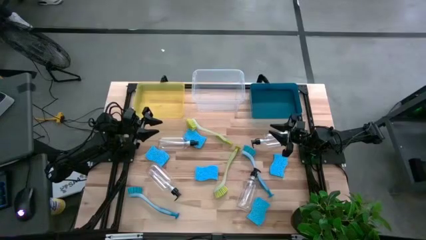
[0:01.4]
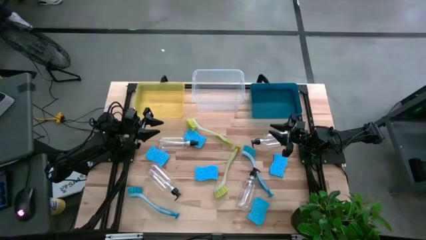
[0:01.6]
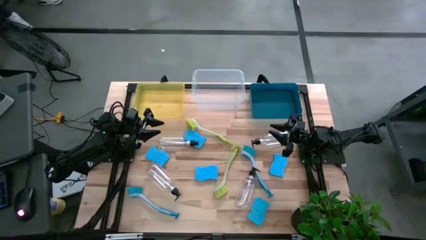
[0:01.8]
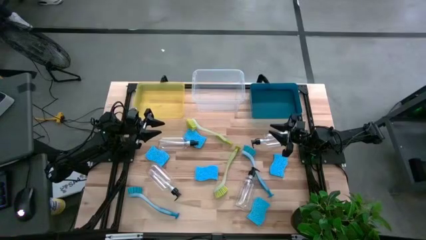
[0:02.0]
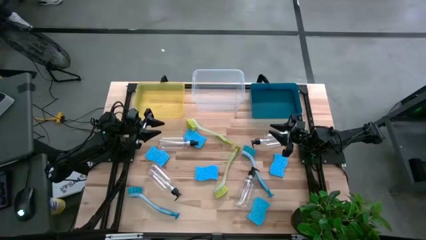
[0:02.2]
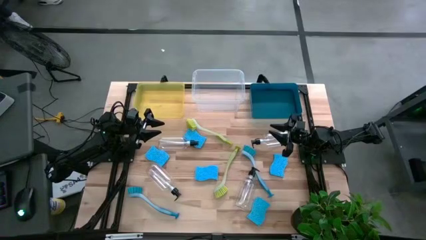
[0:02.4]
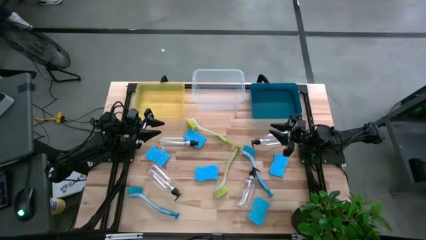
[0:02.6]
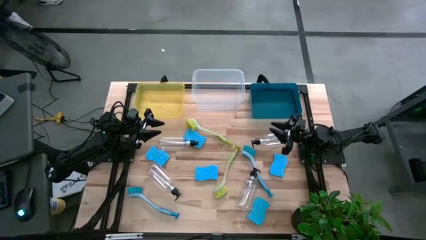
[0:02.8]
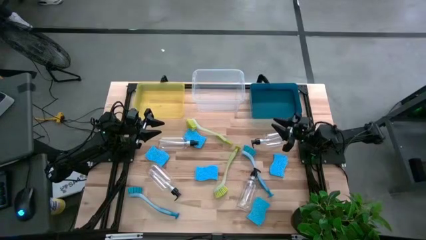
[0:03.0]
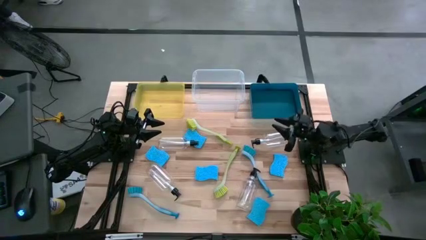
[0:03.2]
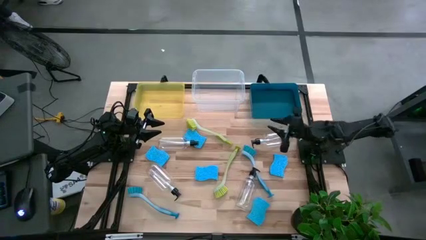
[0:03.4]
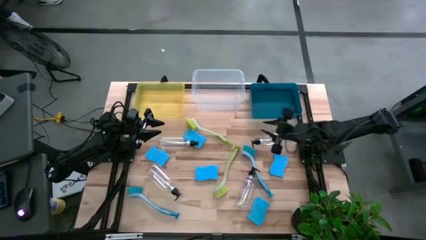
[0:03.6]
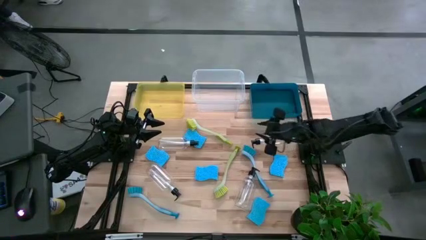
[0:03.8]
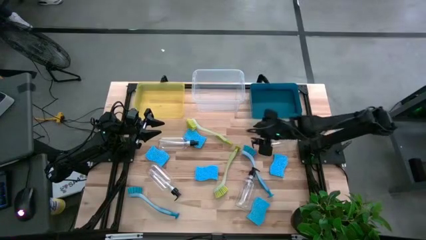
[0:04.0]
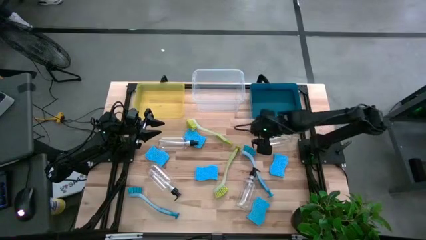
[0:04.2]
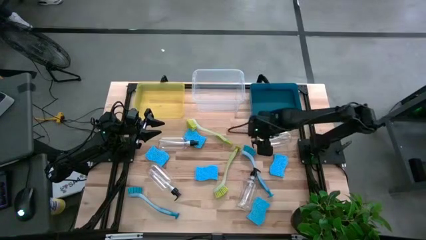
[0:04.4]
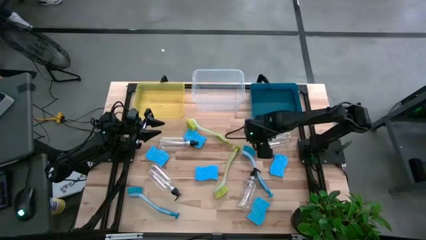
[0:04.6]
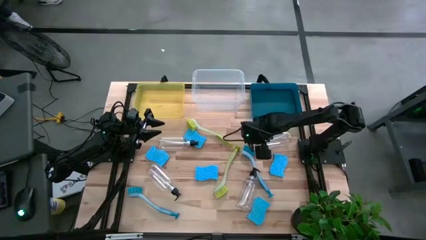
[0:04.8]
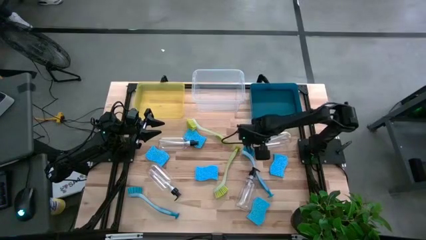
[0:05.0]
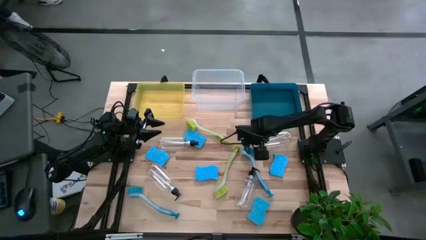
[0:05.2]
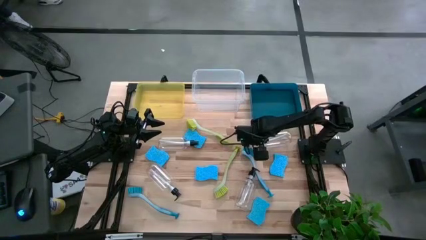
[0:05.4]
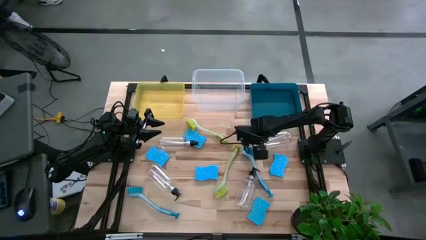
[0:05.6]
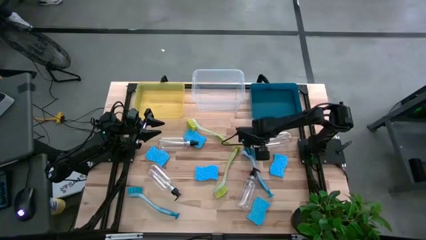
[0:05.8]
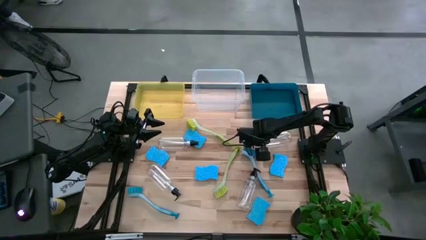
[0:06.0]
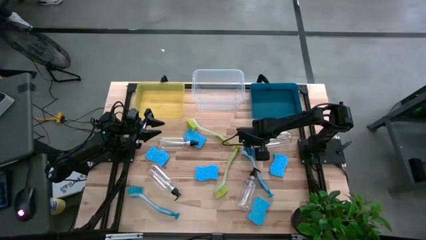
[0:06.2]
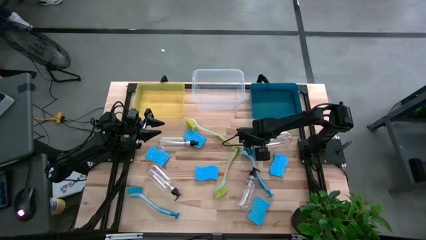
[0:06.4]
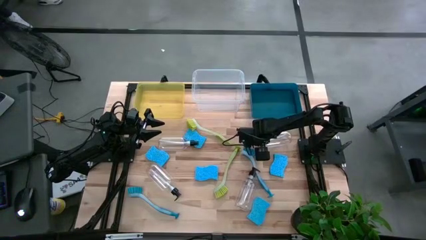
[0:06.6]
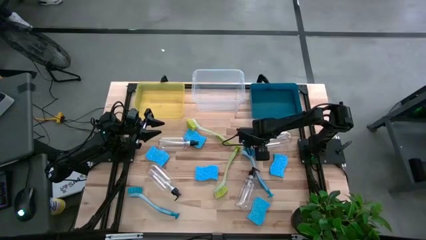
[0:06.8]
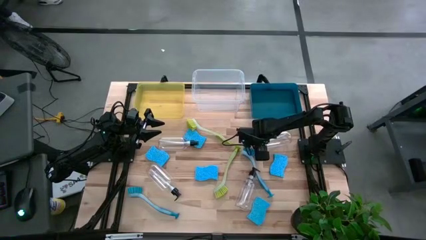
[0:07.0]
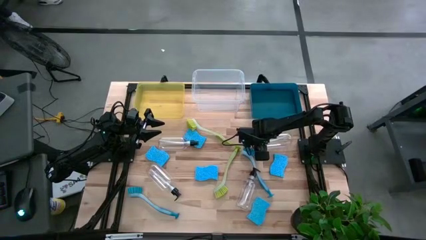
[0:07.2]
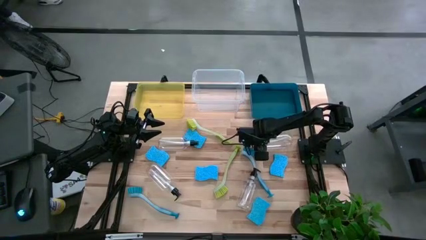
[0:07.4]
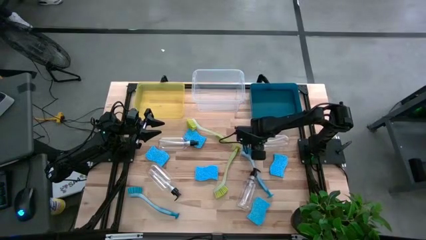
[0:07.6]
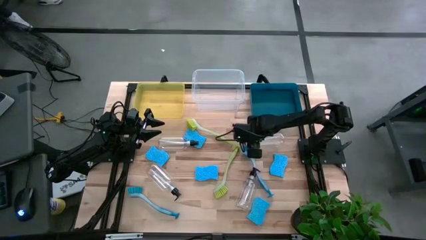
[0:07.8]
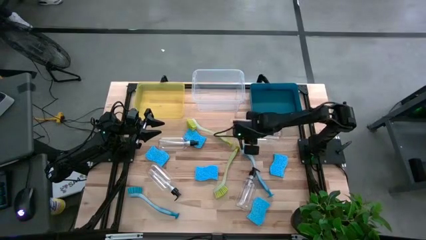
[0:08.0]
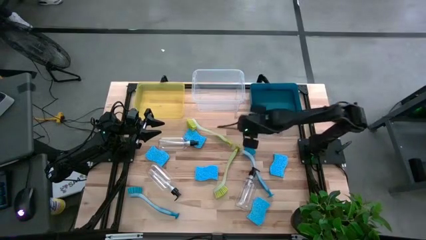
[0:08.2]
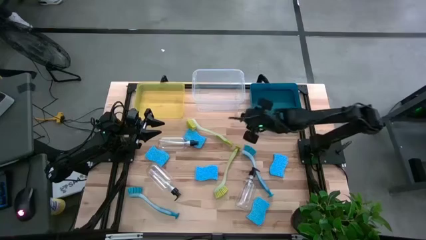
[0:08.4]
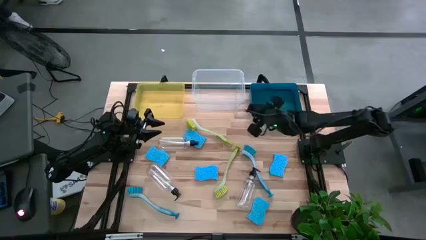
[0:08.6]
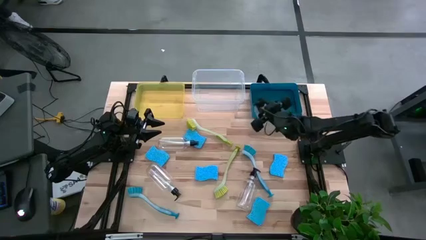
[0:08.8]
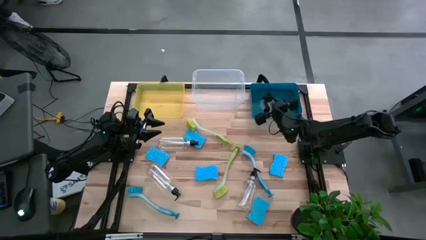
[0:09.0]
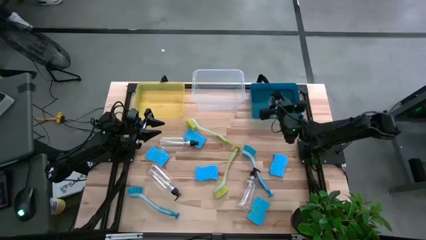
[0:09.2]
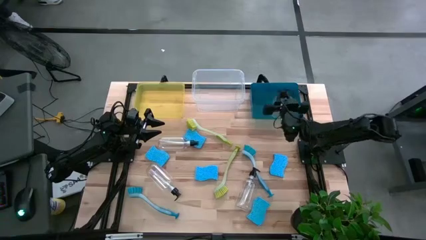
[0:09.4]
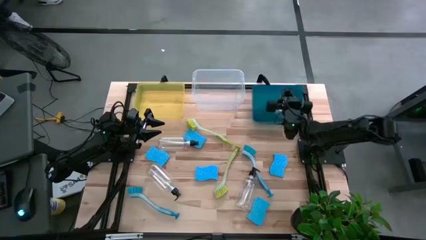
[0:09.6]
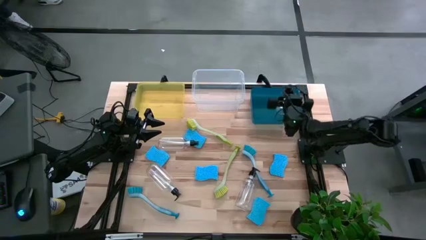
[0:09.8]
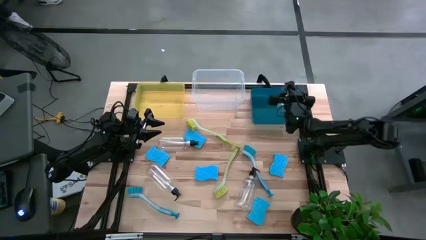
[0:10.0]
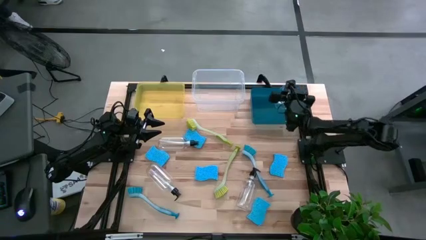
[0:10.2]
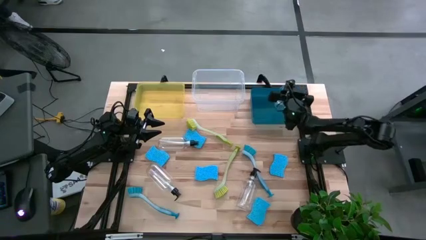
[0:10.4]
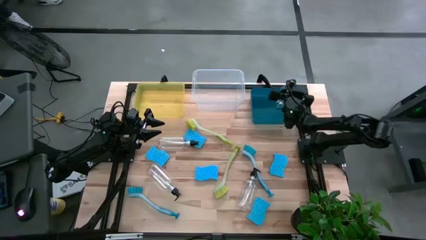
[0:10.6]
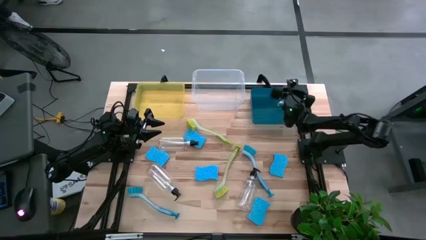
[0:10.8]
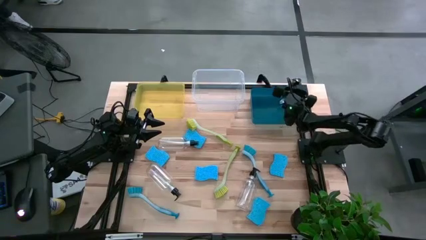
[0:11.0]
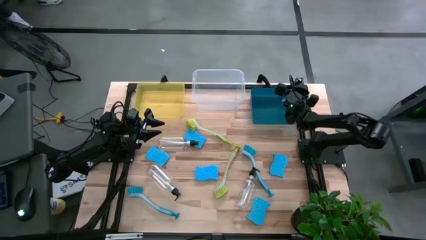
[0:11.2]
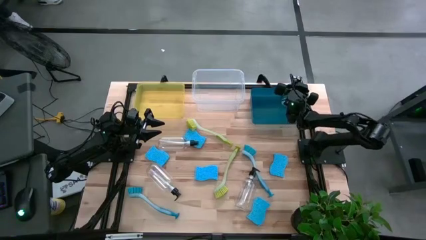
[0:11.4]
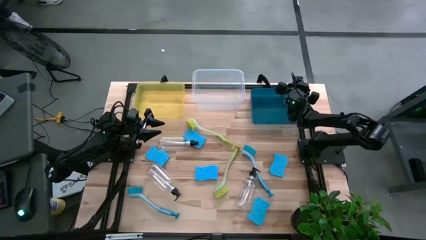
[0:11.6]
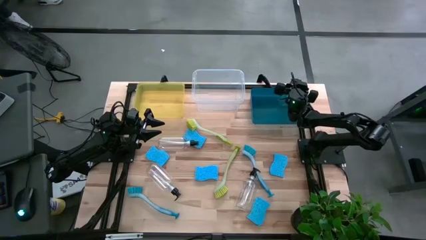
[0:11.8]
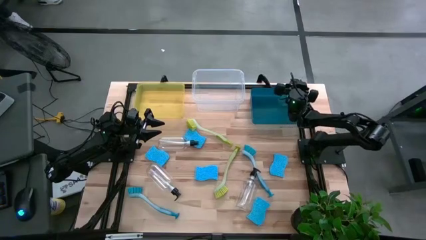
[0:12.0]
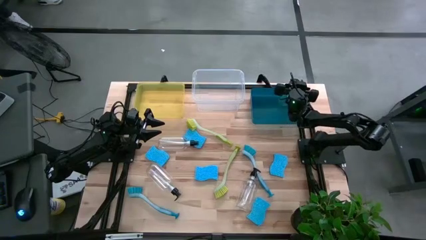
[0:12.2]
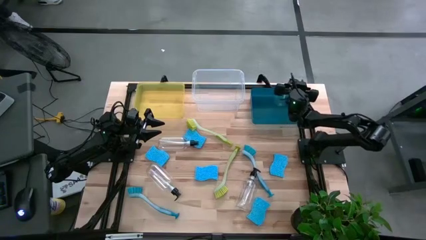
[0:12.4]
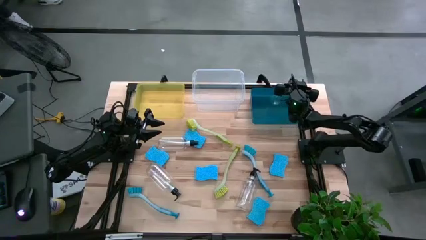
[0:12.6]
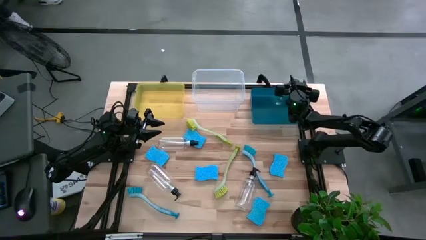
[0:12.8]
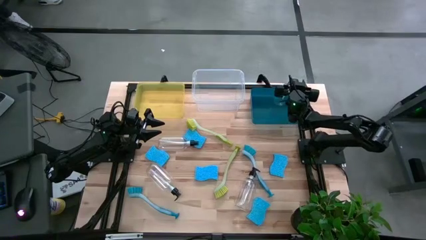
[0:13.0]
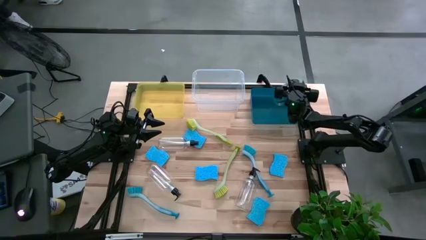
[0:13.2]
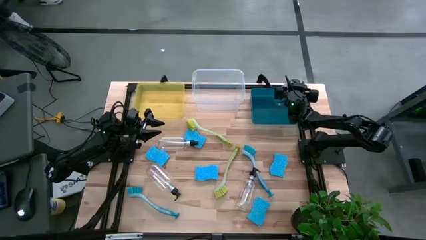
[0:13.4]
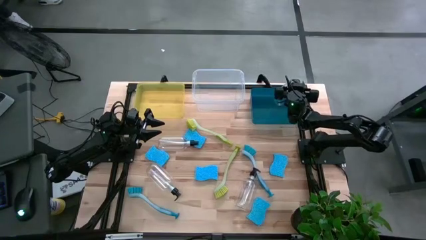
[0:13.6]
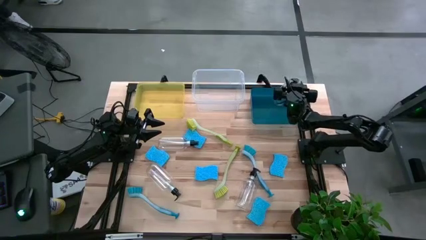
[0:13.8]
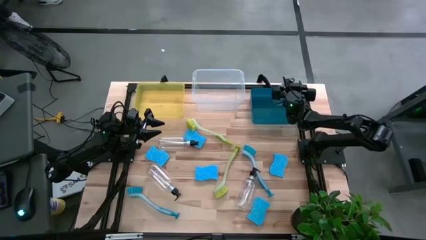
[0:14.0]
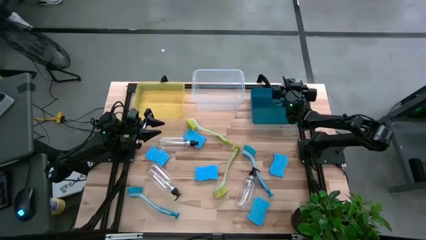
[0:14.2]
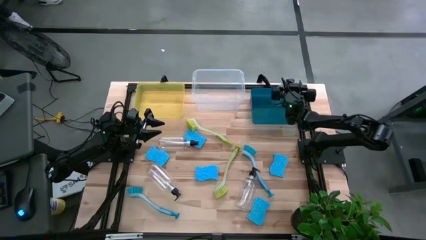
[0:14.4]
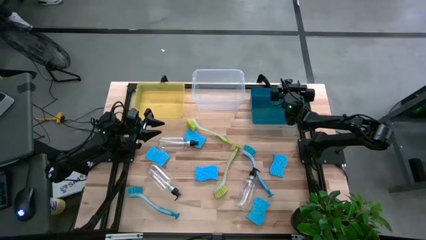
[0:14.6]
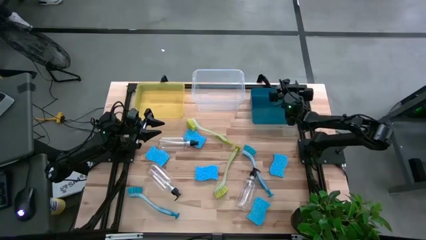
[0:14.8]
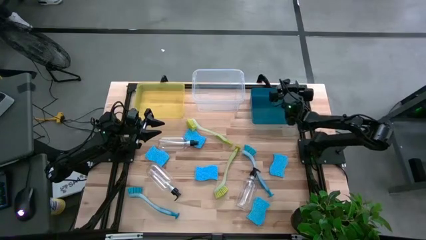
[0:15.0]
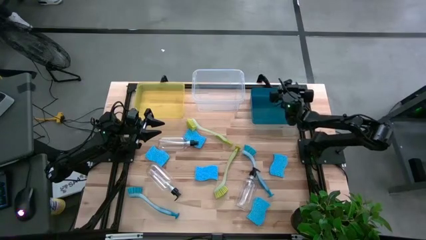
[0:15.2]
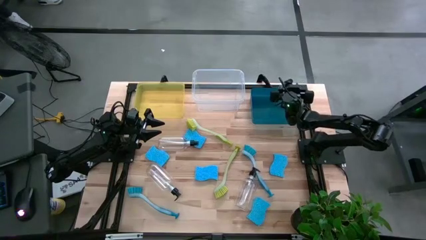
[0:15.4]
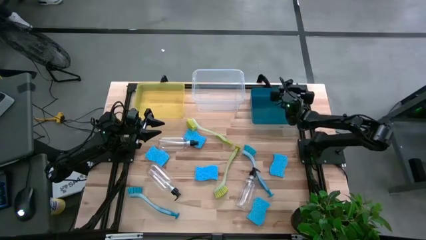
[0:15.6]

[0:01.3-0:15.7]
Task: Pick & Place Kitchen Sink Supplies
Put the transparent spray bottle into the blue bin
